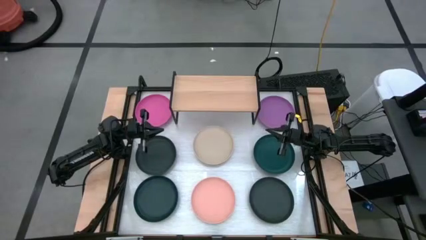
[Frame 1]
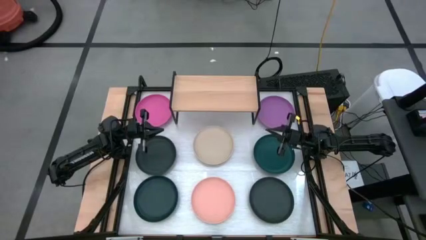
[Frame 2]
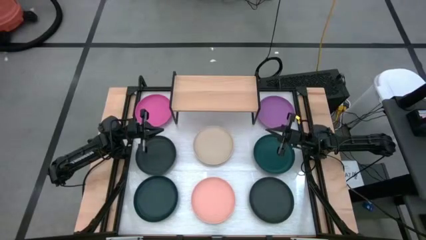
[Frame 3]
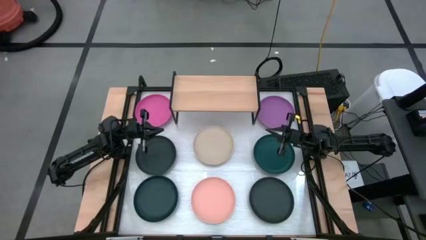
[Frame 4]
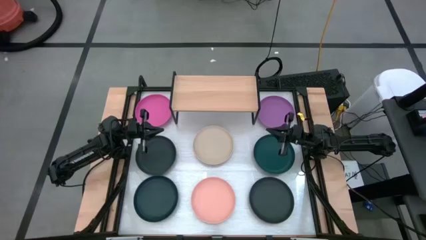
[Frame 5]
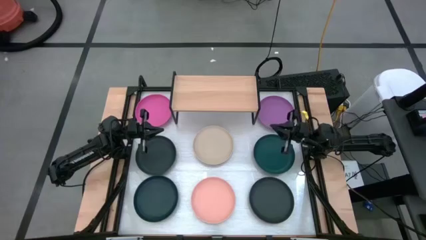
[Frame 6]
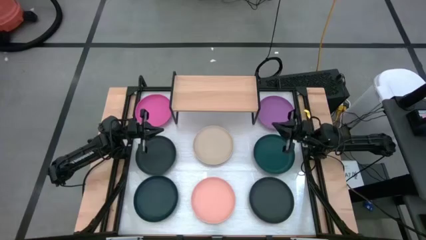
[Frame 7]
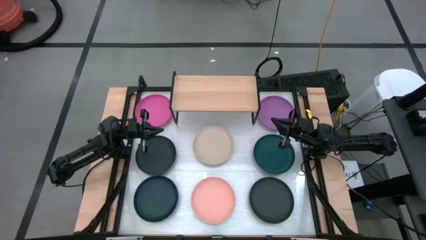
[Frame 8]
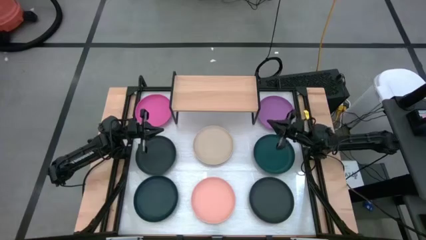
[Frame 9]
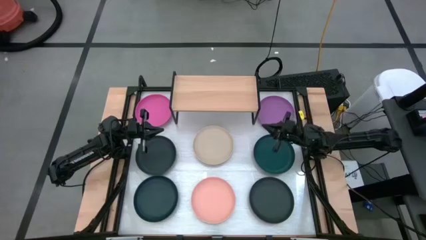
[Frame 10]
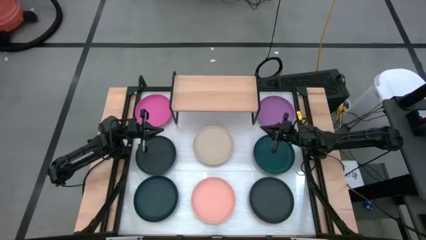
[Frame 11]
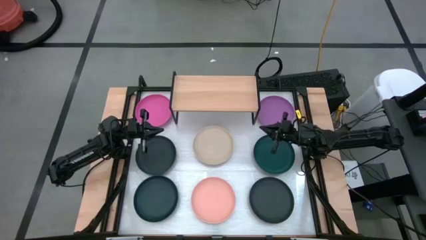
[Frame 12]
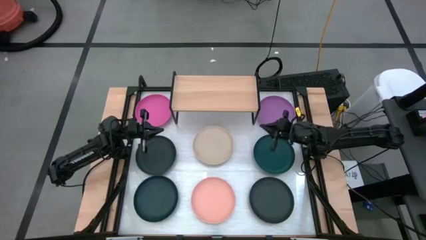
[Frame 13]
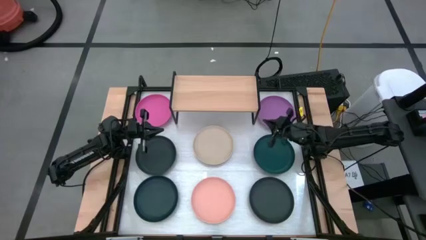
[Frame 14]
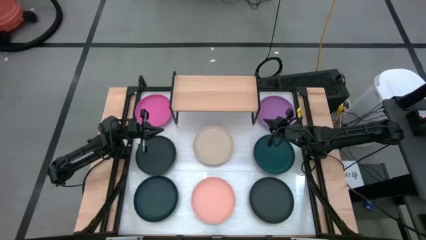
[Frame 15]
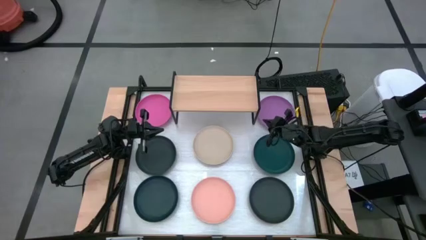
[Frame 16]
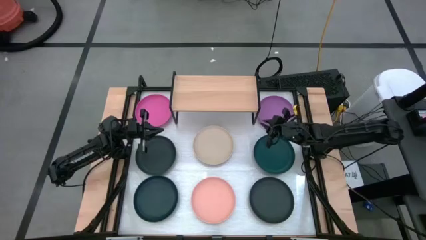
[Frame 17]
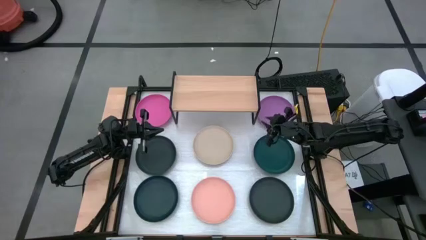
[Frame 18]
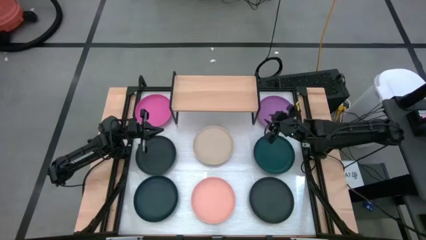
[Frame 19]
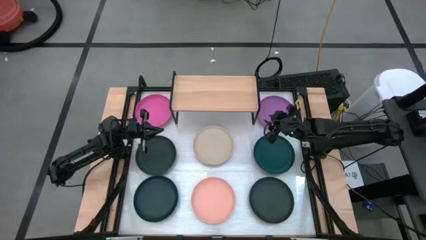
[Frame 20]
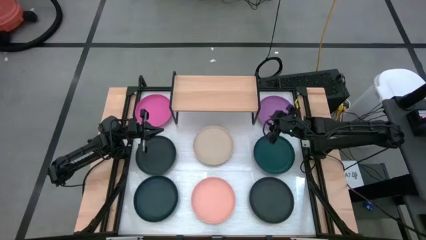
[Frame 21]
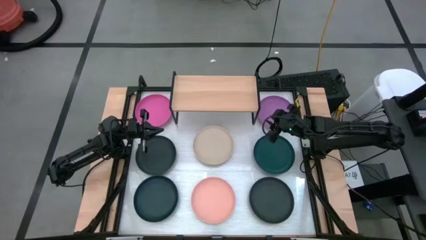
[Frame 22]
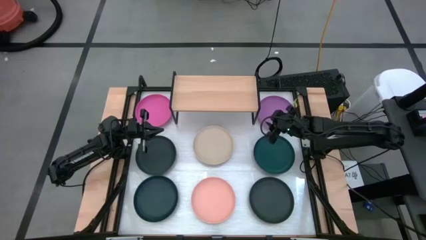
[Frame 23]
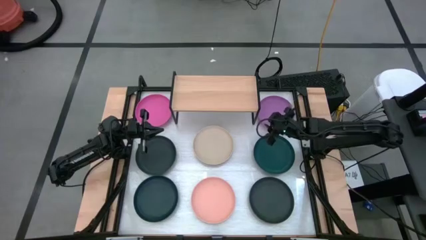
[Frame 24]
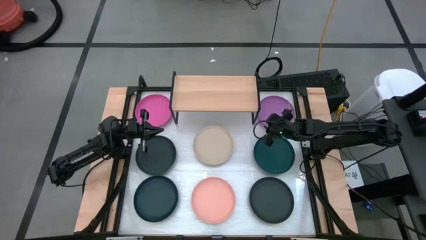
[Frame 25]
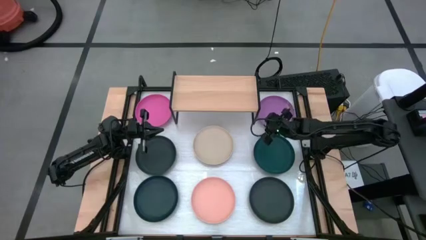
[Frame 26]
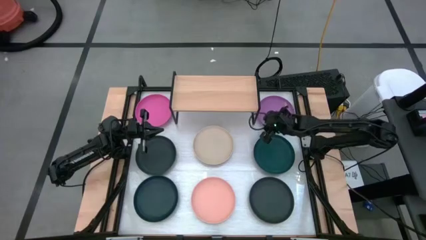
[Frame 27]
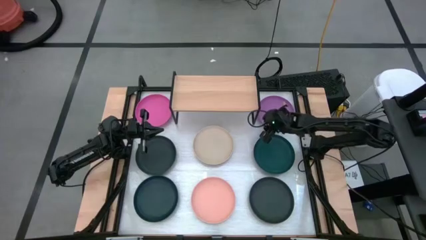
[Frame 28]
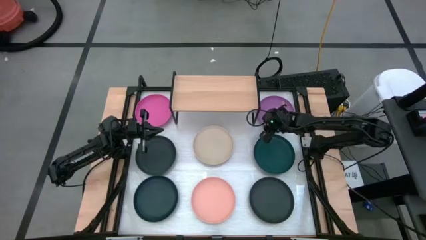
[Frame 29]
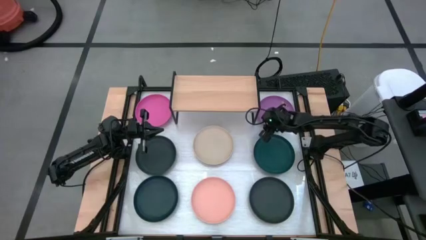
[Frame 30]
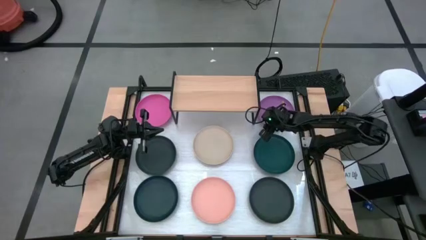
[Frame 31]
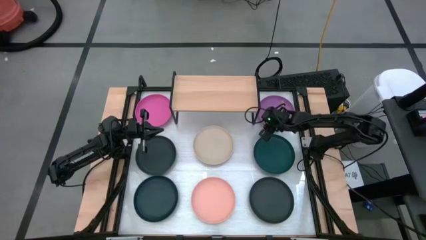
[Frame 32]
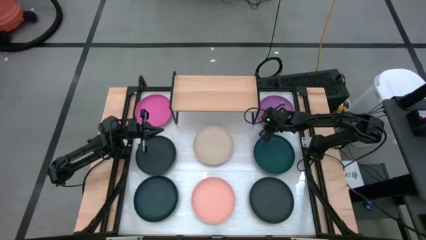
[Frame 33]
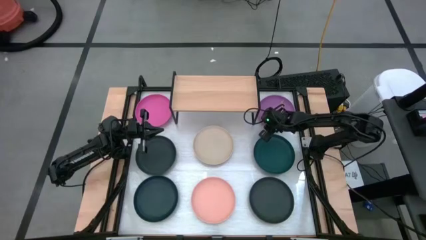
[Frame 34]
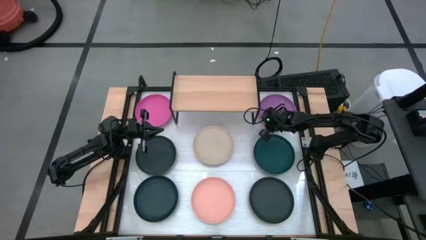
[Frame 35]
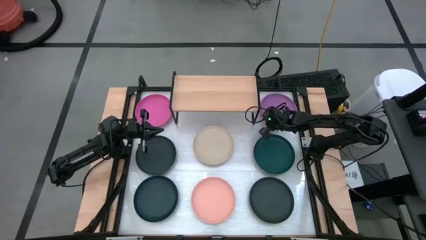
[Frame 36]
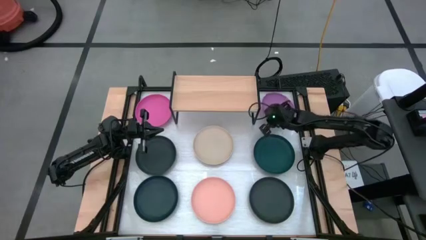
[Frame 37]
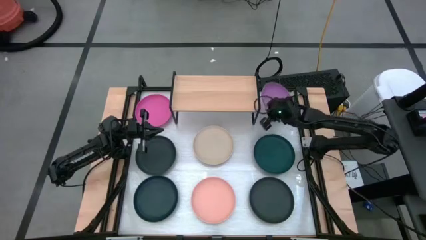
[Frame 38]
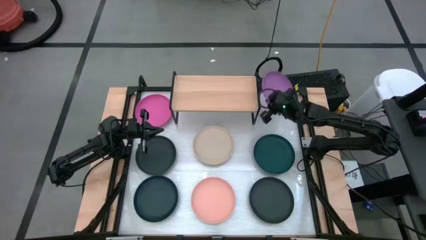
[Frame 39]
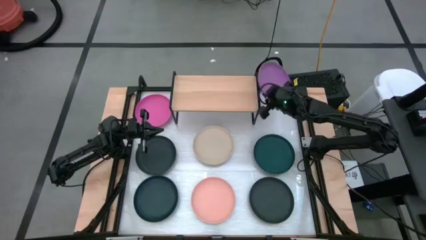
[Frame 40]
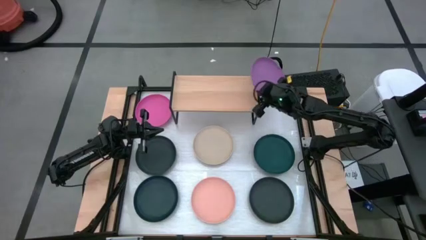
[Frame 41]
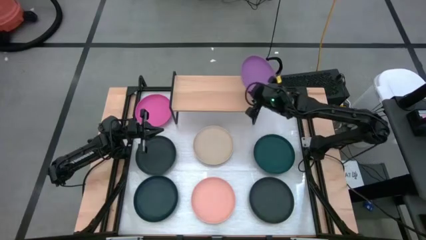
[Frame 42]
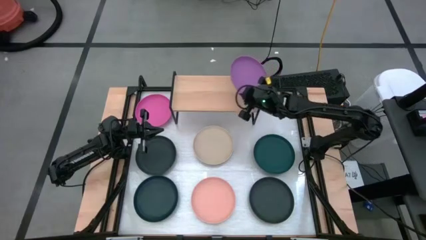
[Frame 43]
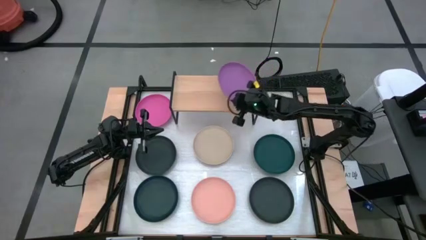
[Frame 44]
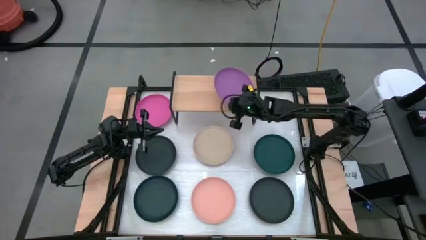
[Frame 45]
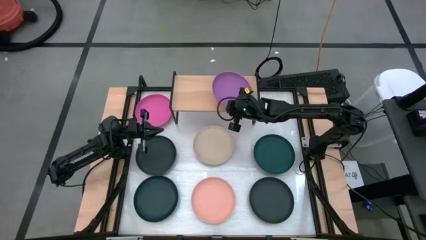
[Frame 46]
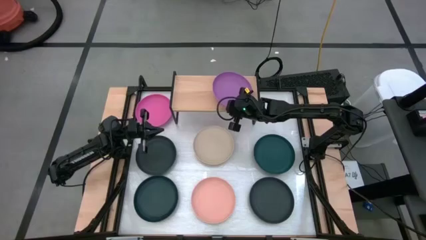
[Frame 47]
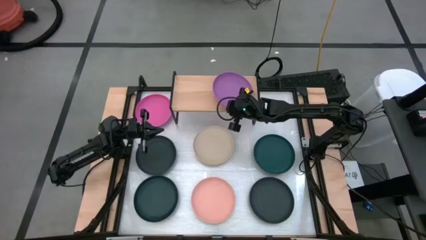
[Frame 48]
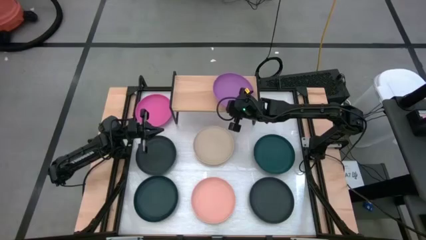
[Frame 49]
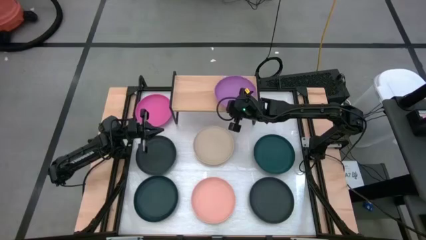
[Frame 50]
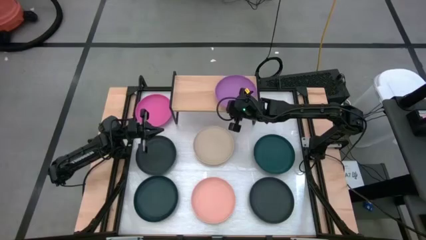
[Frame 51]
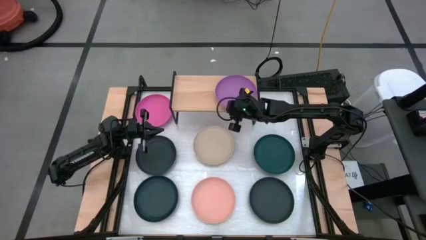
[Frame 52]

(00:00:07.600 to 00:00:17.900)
Task: Place and stack plates onto a shelf
Put the purple plate on the shelf

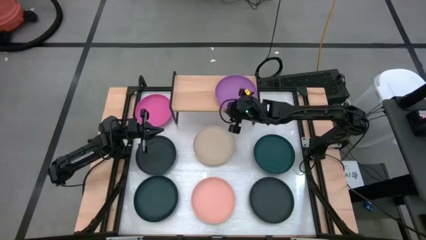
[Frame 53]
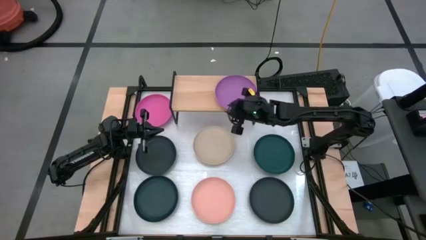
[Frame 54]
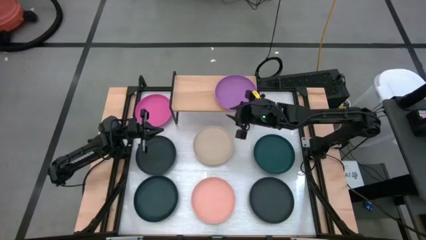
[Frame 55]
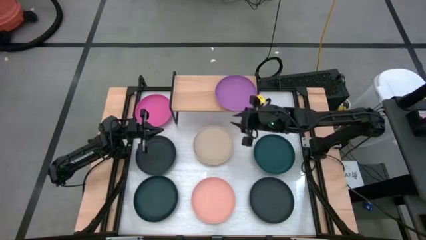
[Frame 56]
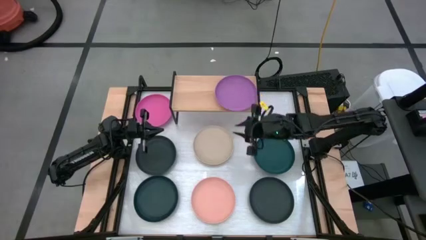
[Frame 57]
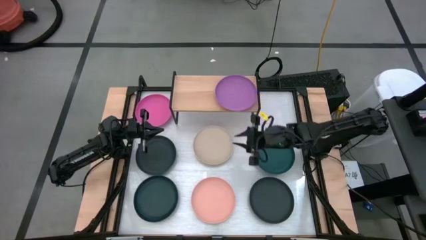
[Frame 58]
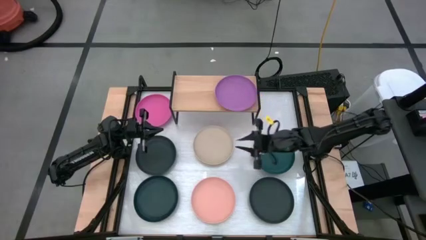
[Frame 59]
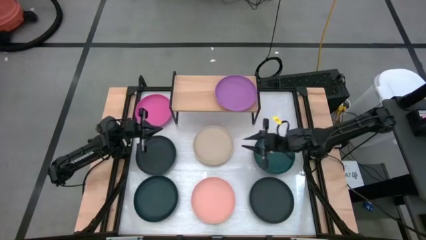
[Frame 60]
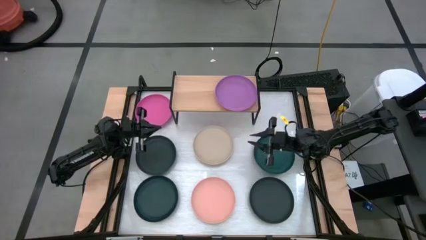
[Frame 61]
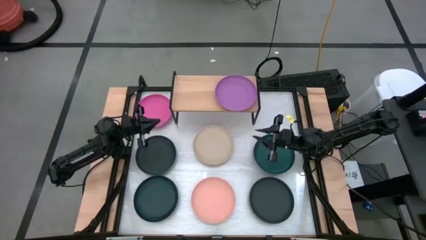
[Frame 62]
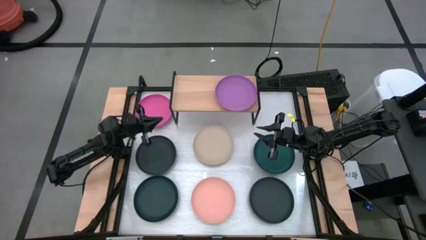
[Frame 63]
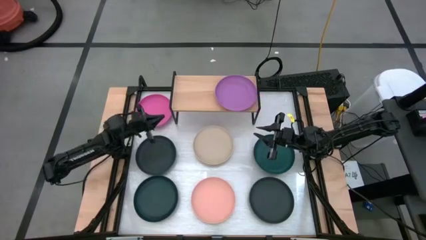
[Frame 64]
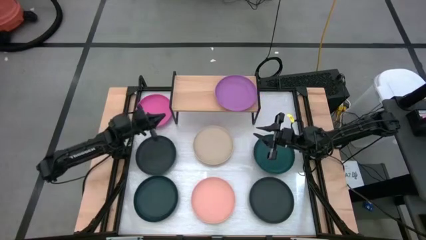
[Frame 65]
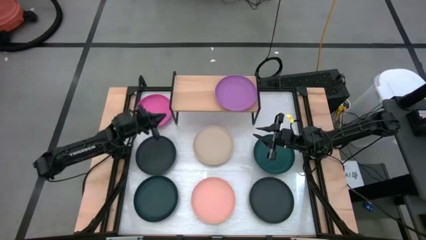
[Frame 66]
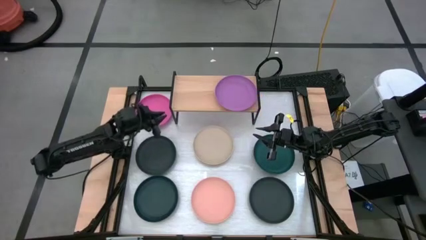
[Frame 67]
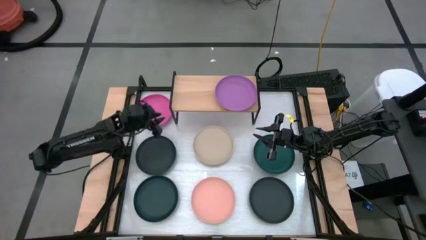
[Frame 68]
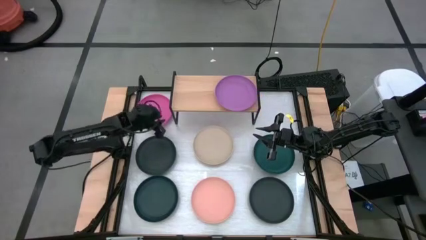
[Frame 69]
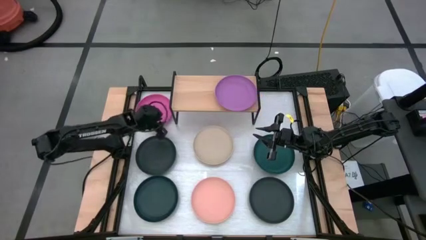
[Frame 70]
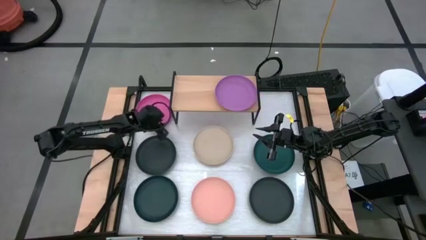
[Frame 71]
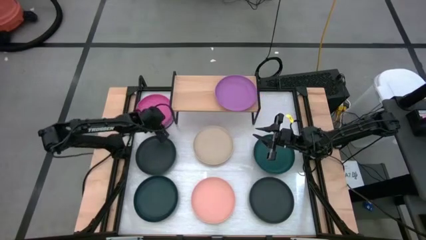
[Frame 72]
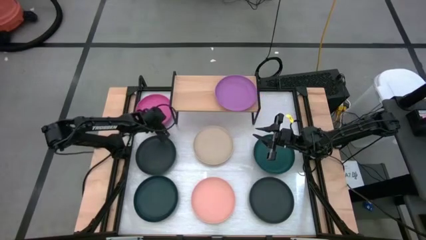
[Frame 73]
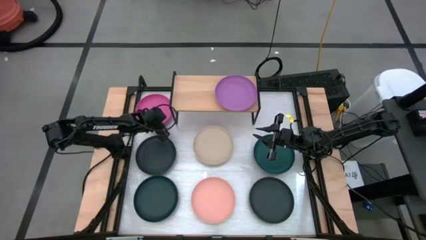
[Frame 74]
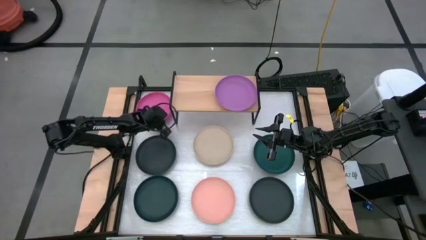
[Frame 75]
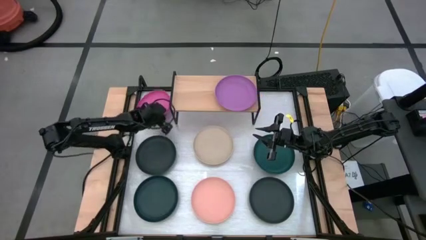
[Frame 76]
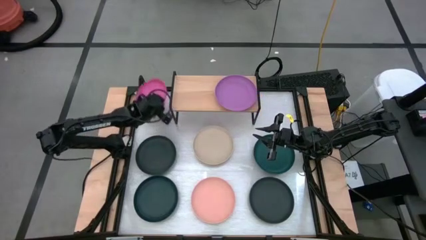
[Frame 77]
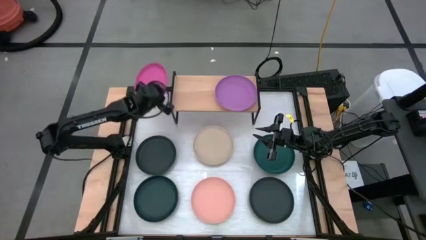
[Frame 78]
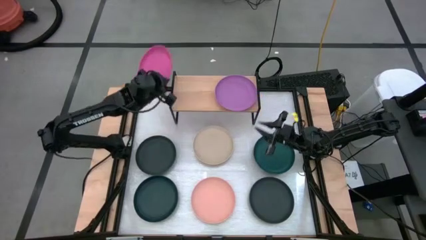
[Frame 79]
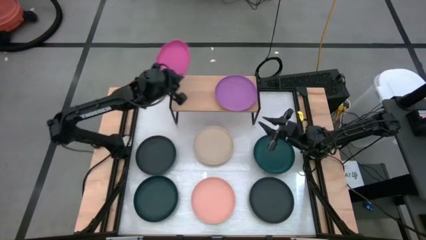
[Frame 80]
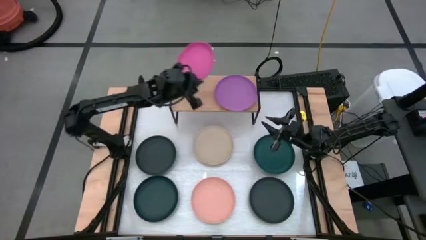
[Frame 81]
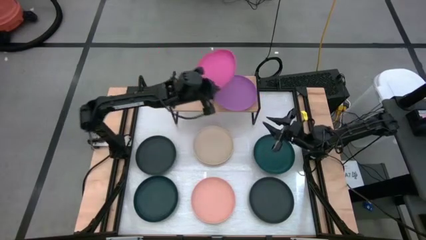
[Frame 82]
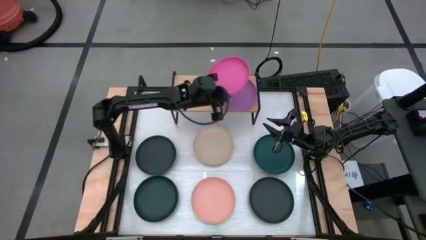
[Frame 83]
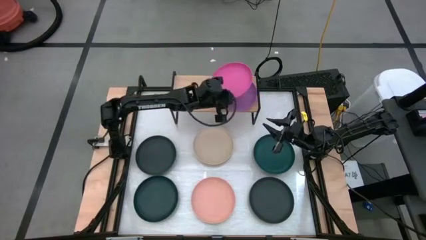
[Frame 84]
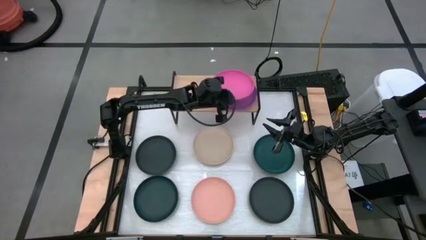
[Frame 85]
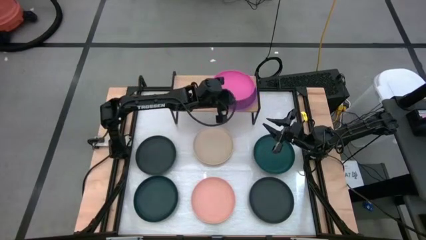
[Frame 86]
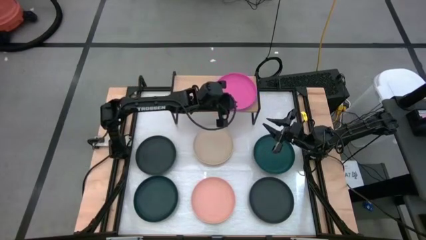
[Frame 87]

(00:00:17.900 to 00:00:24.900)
Stack the pink plate on top of the purple plate on the shelf
